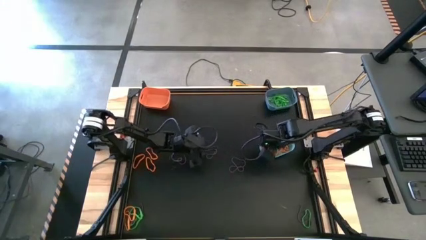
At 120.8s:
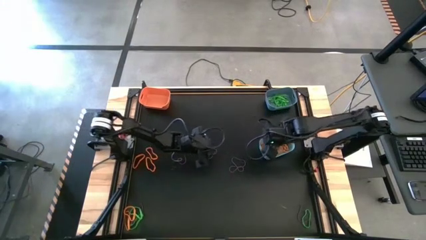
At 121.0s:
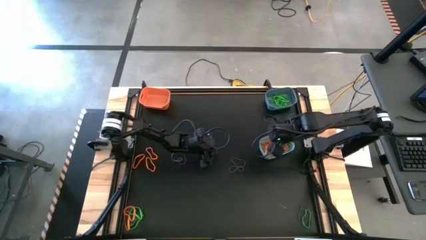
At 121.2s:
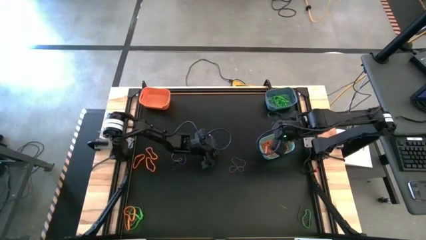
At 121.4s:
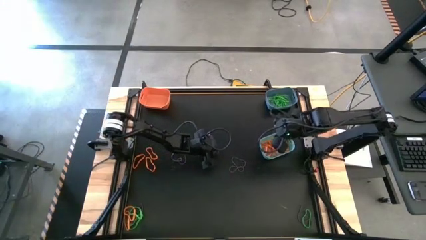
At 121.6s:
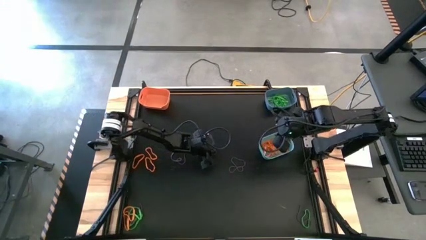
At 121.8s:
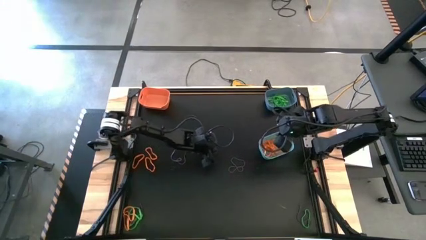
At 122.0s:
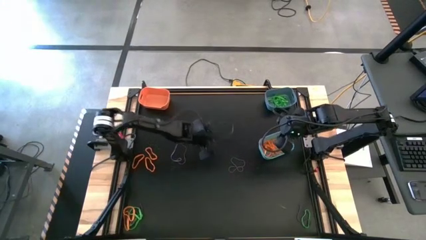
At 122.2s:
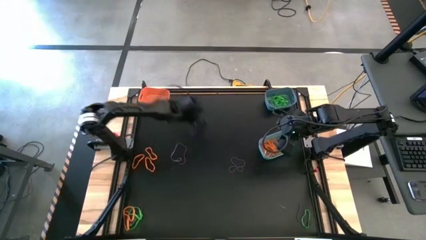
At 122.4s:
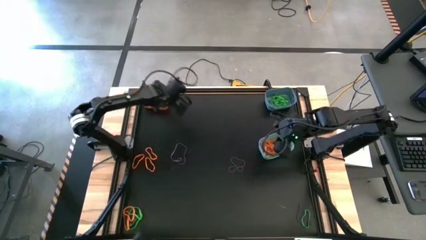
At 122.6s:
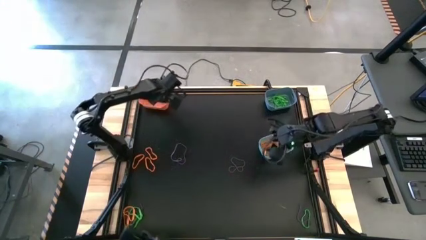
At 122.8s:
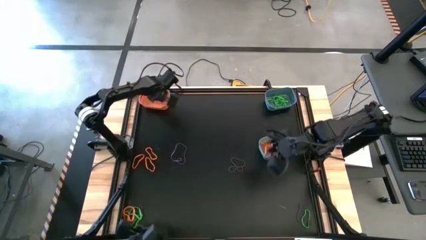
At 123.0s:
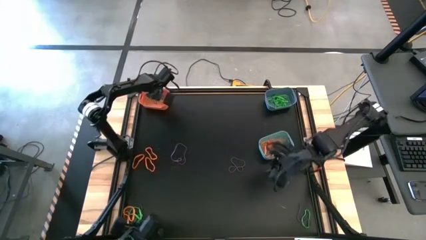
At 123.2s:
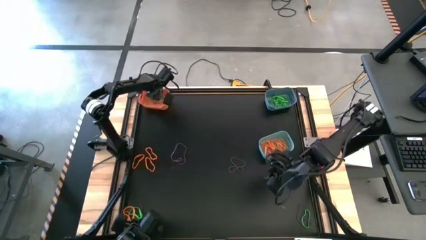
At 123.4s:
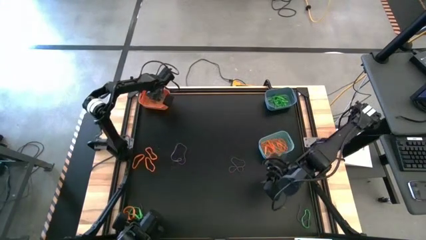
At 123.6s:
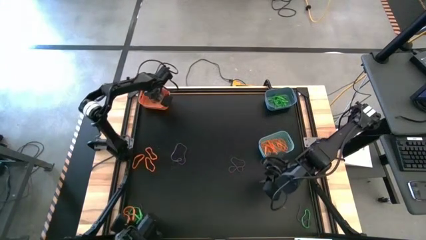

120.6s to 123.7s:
Task: Sort rubber bands into baskets
Put the purple rubber band into the orange bin

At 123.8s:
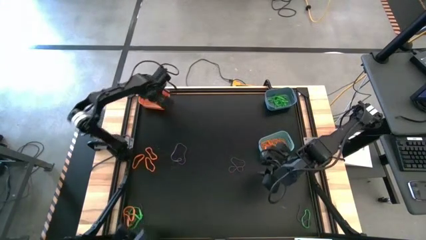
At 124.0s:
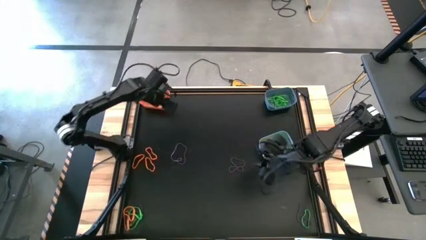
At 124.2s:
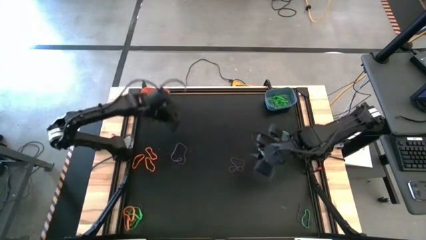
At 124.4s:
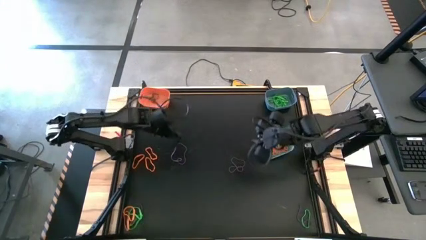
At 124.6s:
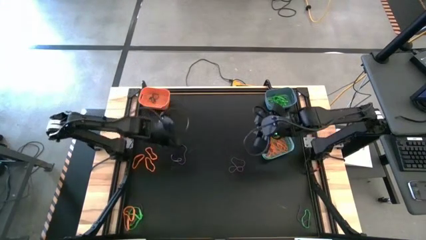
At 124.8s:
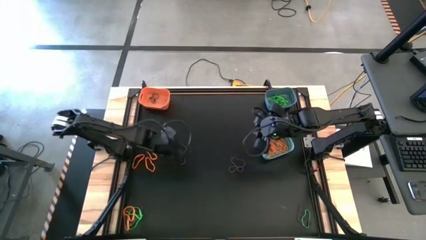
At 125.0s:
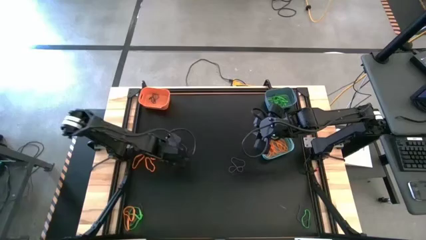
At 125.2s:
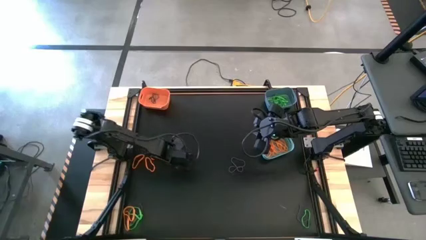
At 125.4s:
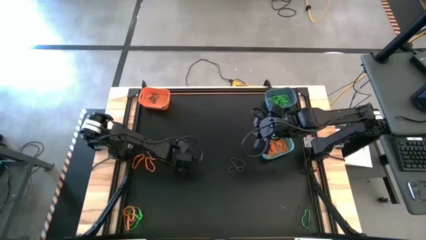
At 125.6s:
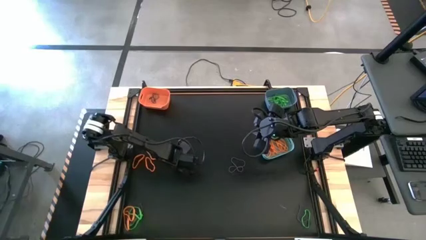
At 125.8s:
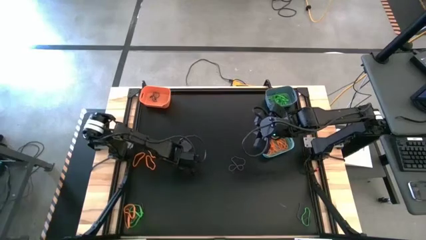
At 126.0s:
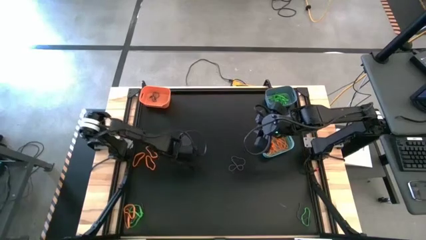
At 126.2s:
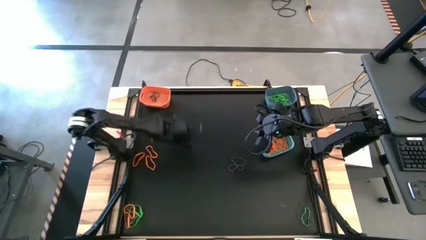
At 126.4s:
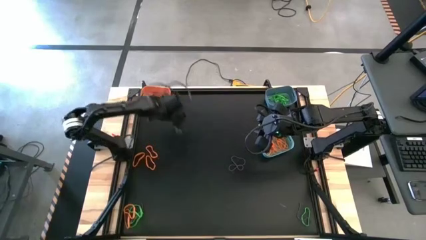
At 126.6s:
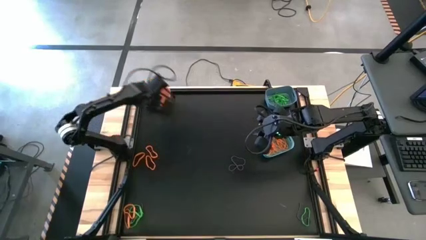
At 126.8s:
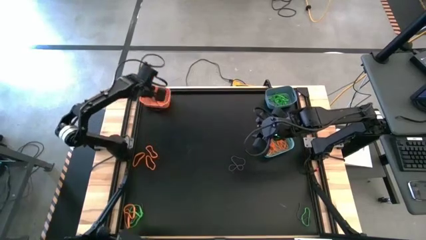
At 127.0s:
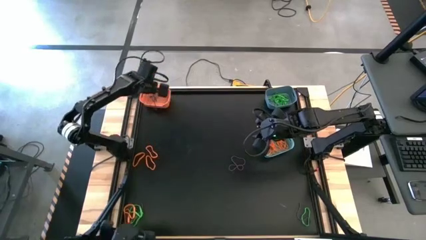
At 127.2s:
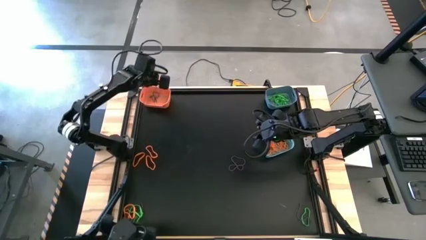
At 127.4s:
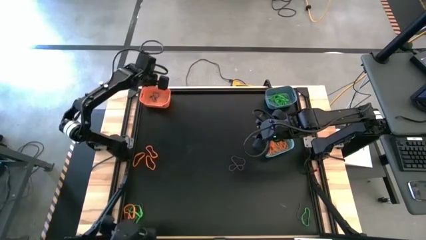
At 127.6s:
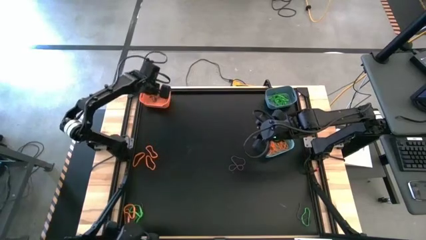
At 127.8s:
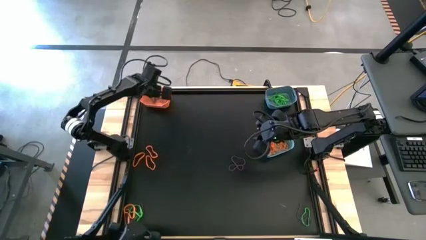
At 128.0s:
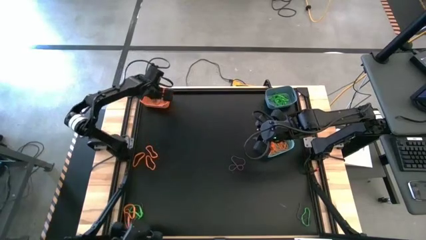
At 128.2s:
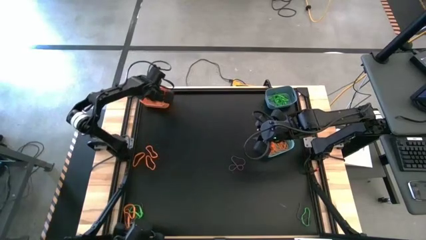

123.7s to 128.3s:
Put the purple rubber band into the orange bin

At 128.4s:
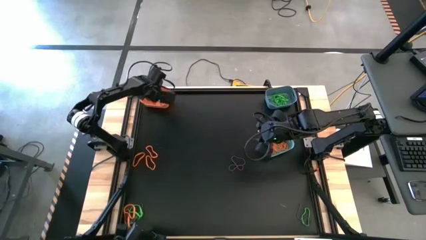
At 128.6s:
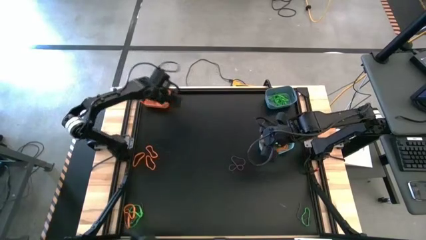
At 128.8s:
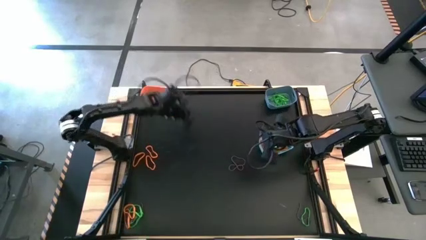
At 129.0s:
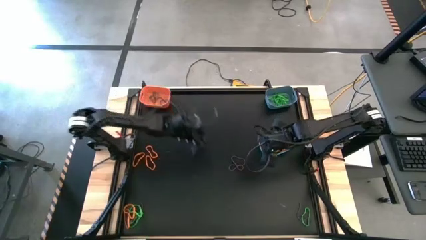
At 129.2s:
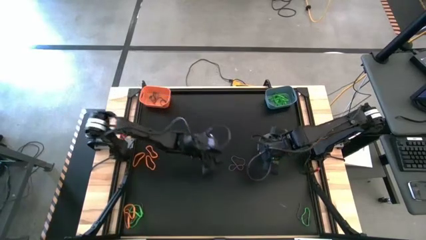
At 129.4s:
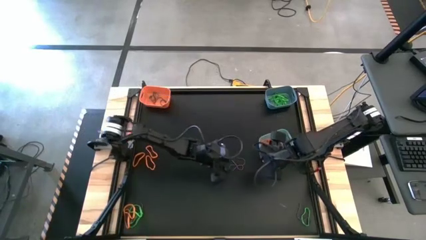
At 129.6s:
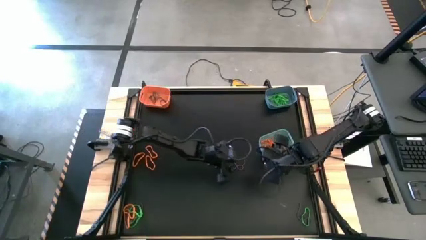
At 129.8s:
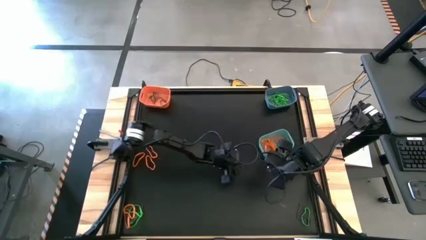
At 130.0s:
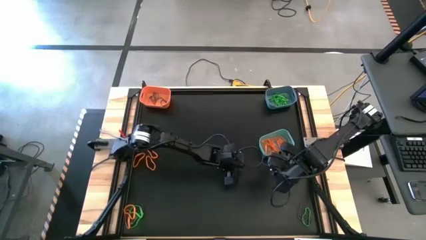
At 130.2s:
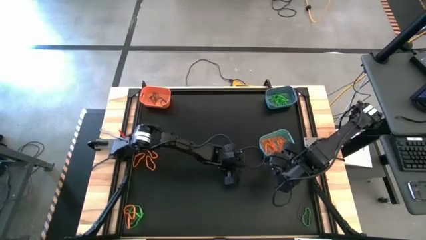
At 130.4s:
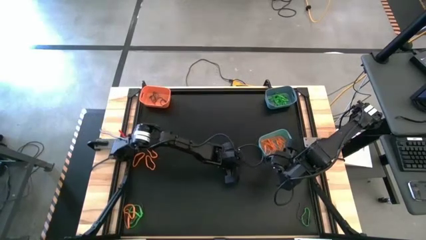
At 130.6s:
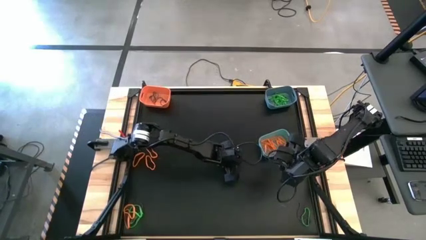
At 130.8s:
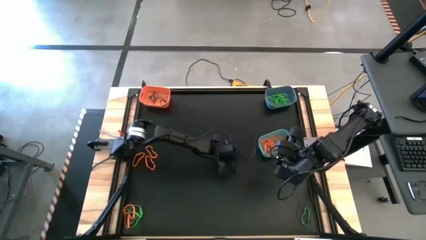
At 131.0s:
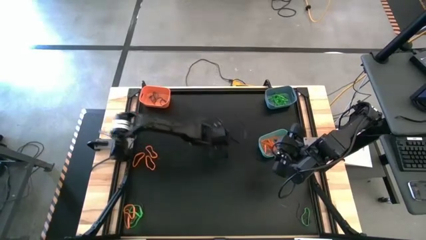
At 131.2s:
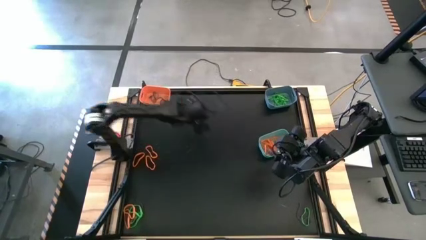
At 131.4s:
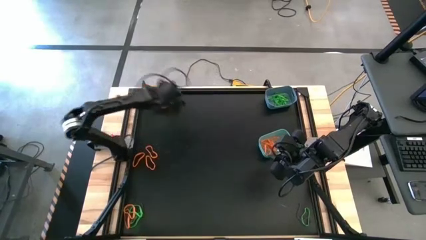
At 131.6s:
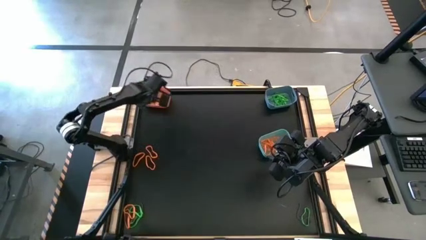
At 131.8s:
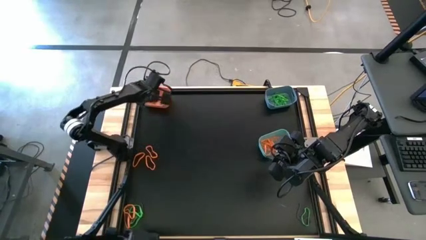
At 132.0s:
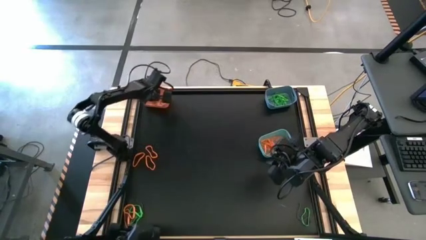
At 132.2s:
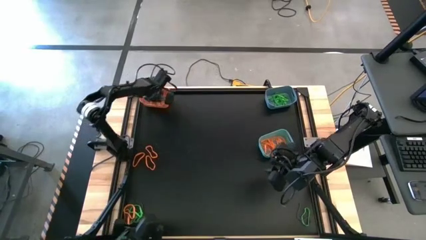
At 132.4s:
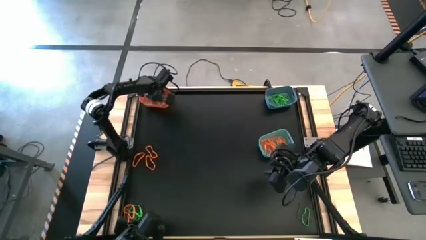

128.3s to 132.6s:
Put the purple rubber band into the orange bin

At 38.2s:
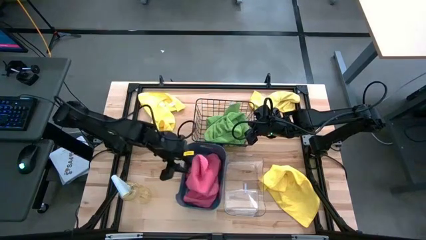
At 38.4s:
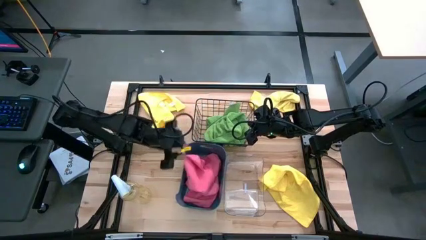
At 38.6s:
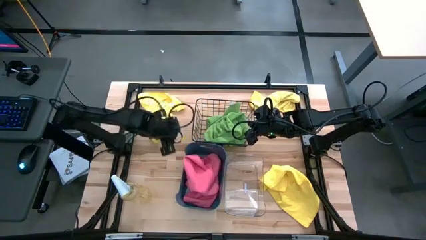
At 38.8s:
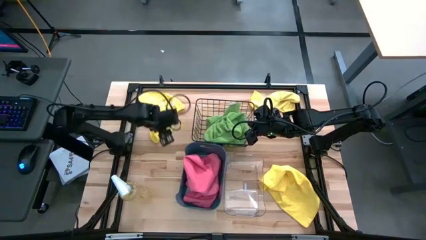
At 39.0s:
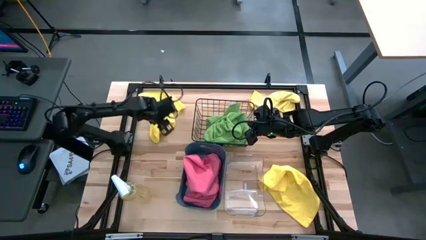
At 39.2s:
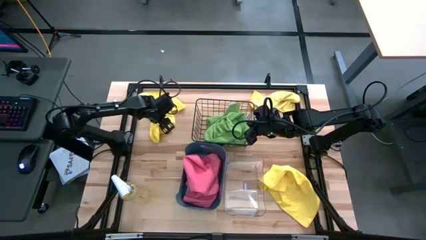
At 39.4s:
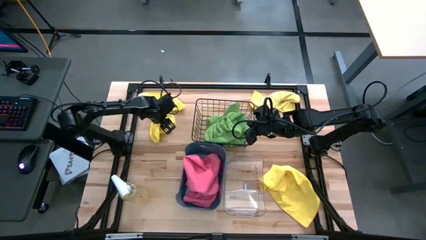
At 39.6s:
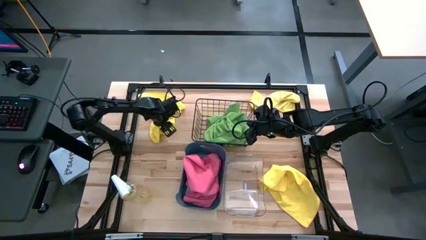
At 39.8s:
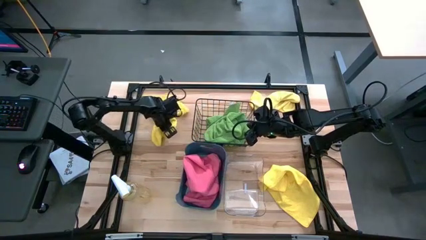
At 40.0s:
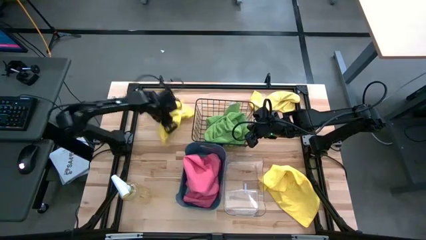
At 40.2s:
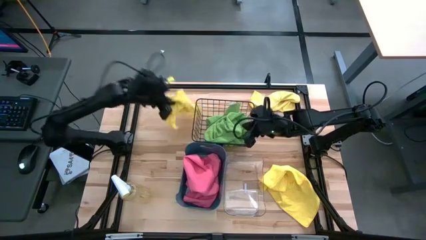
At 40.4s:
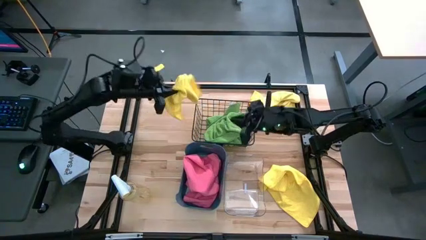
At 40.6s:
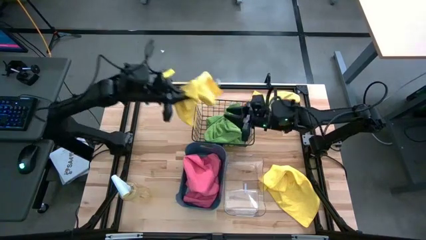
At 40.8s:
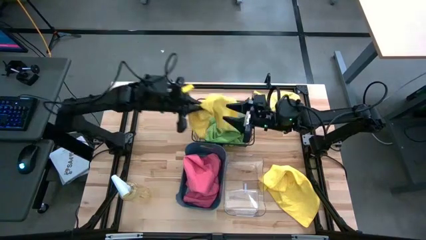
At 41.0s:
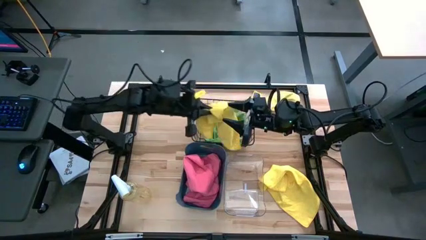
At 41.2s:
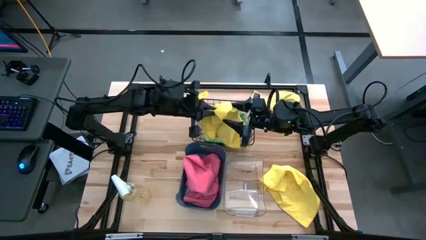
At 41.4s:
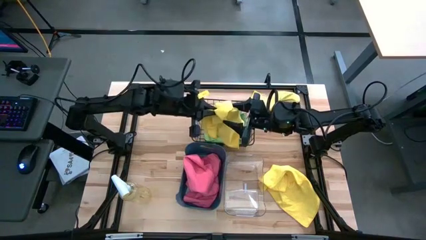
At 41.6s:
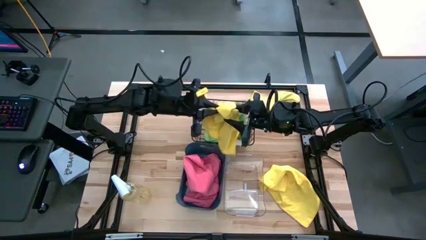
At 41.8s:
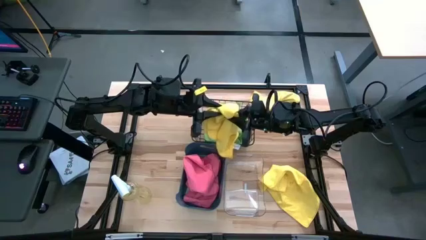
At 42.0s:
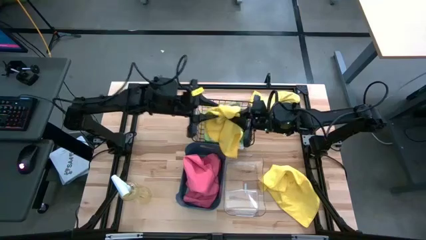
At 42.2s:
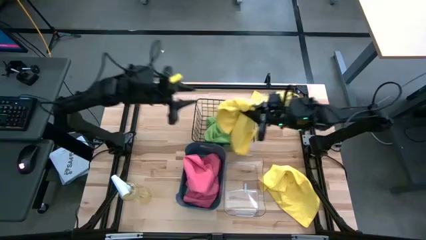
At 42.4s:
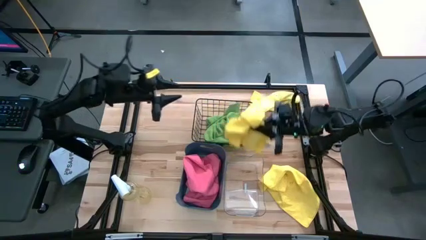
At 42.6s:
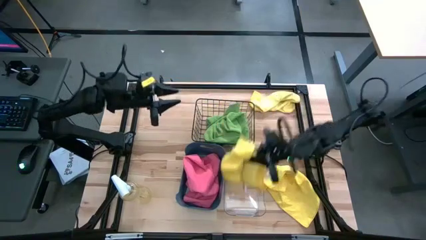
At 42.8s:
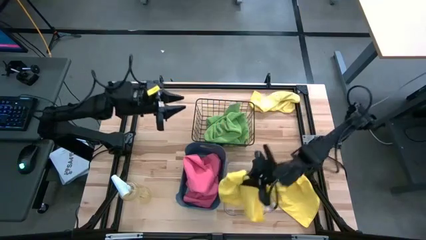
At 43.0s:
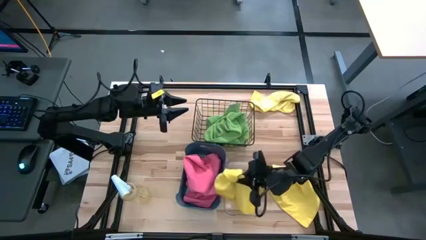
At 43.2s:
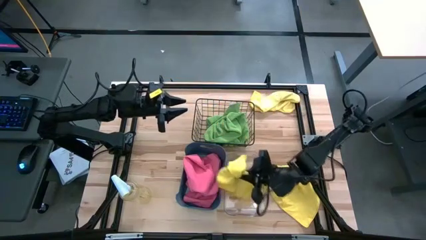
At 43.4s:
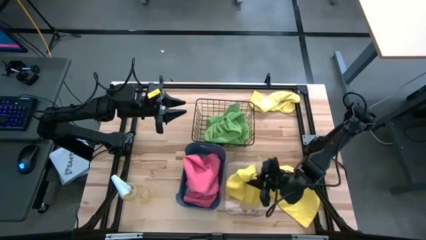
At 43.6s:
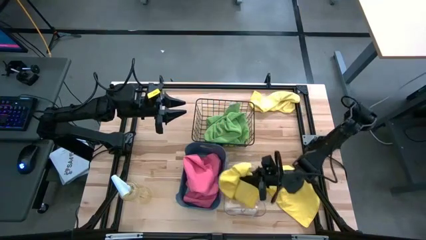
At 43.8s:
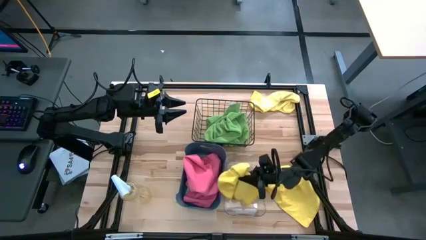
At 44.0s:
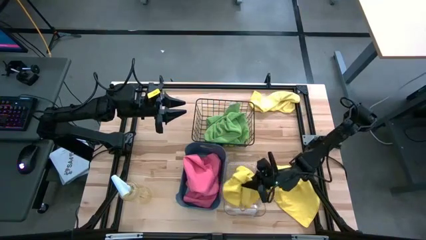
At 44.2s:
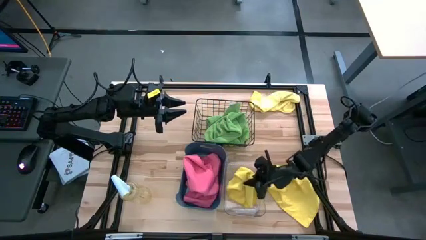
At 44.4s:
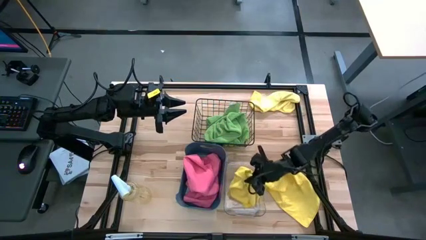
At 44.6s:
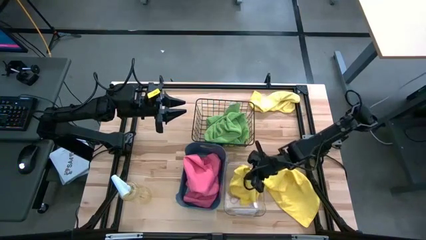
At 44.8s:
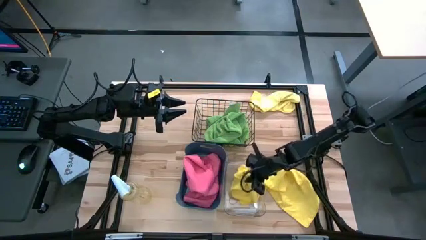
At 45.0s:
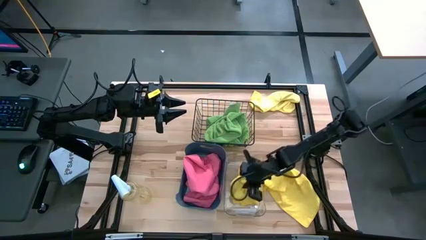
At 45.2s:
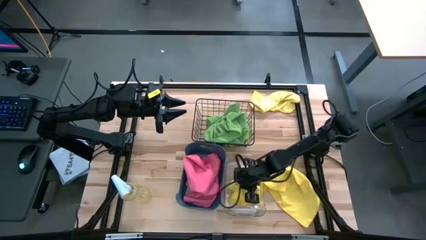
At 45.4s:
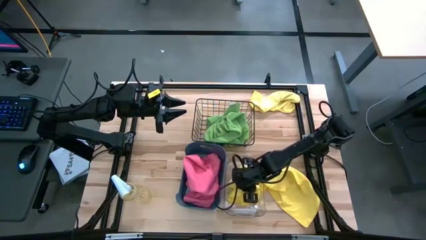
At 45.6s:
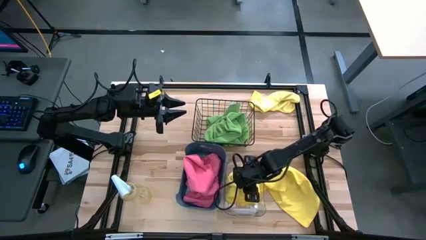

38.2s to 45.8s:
Task: Sort microfiber towel by color & place in baskets
Put the top left yellow microfiber cloth into the transparent bin
